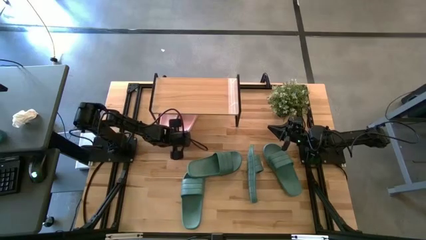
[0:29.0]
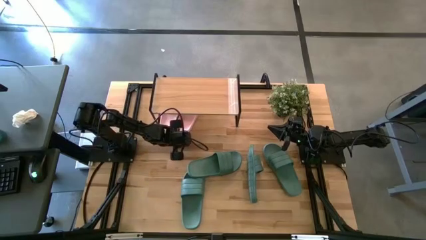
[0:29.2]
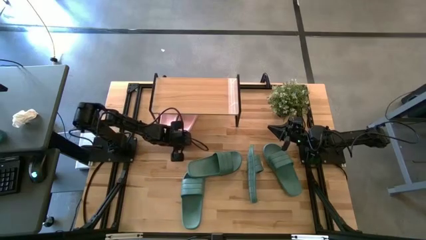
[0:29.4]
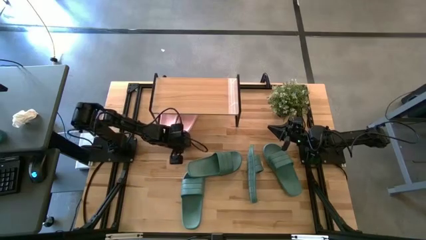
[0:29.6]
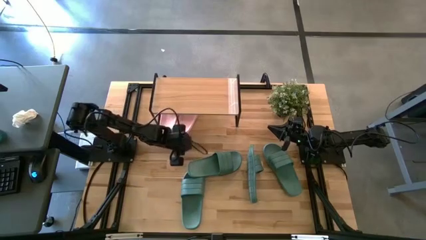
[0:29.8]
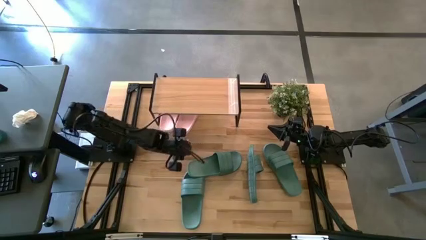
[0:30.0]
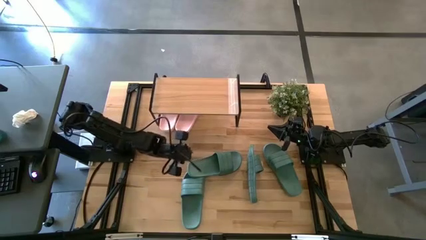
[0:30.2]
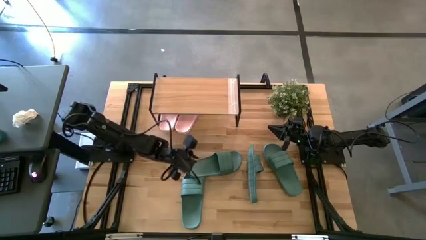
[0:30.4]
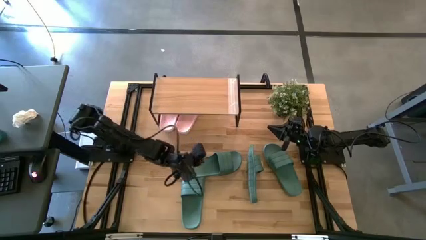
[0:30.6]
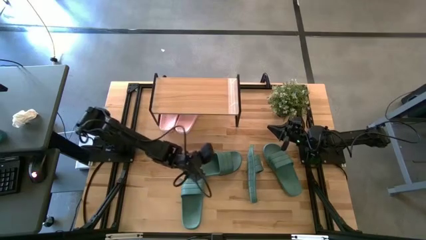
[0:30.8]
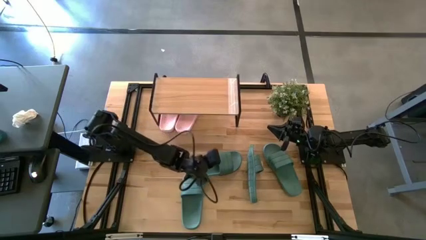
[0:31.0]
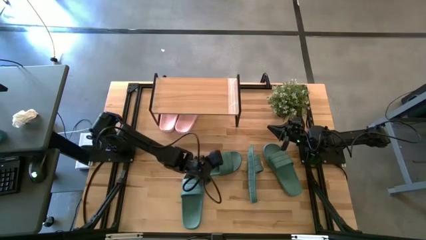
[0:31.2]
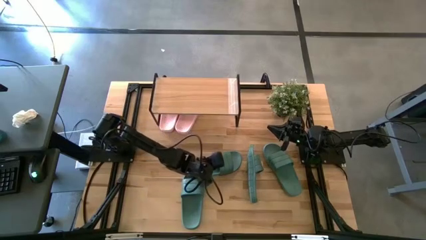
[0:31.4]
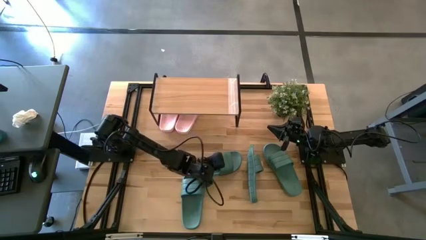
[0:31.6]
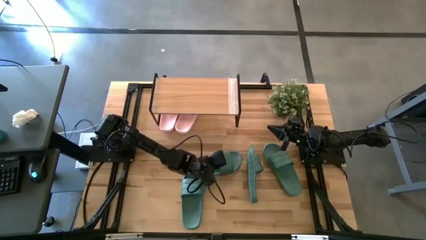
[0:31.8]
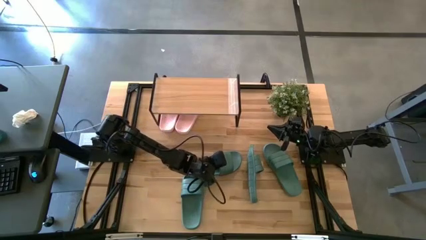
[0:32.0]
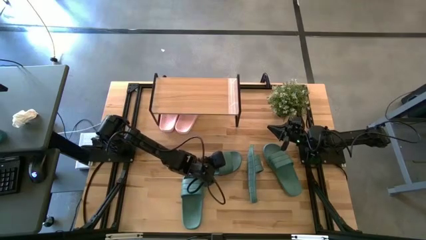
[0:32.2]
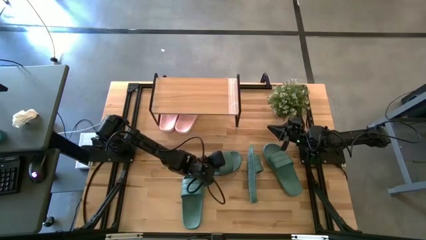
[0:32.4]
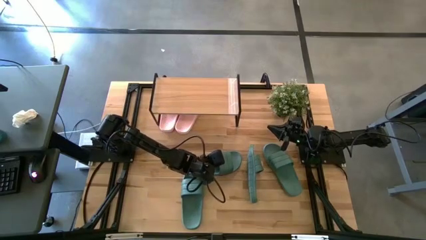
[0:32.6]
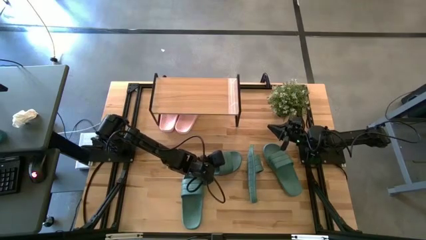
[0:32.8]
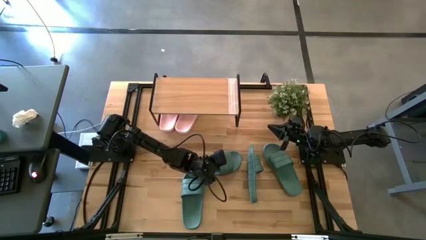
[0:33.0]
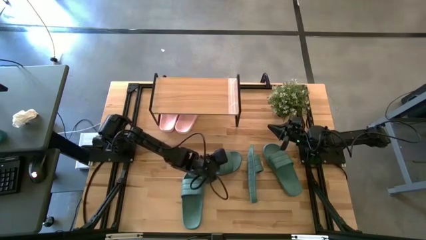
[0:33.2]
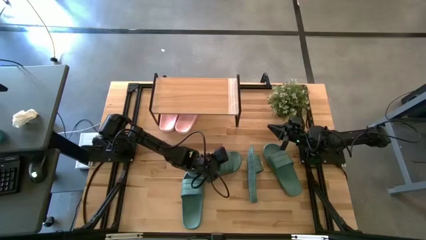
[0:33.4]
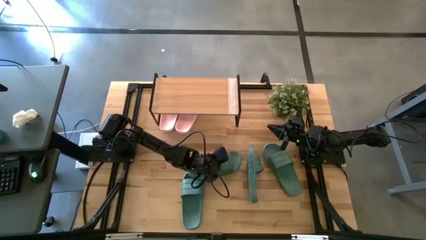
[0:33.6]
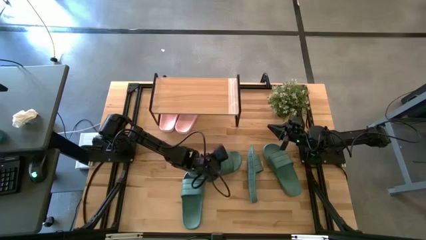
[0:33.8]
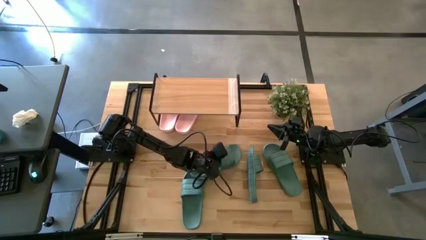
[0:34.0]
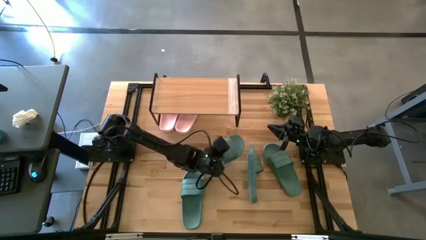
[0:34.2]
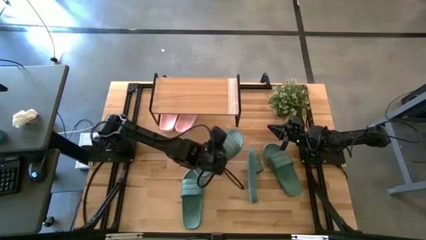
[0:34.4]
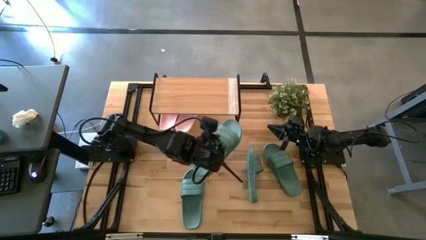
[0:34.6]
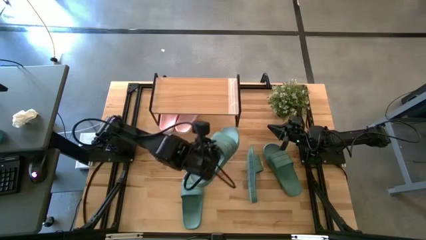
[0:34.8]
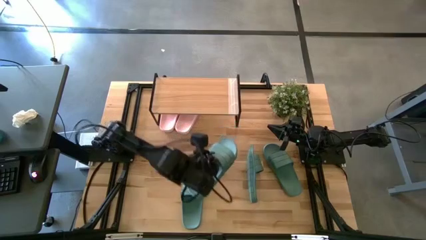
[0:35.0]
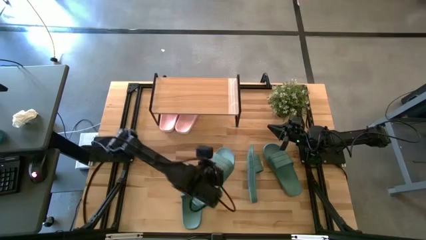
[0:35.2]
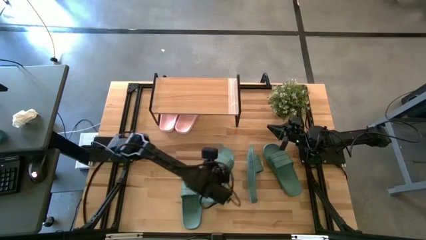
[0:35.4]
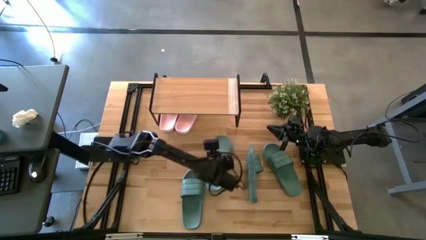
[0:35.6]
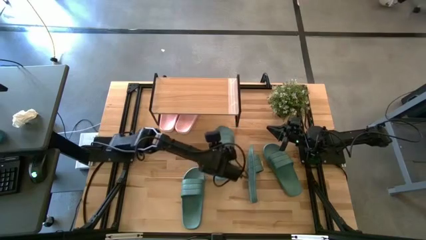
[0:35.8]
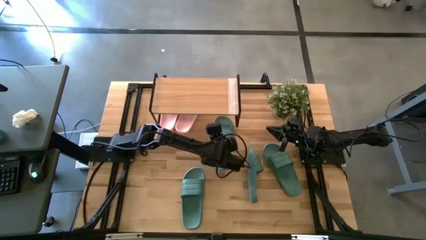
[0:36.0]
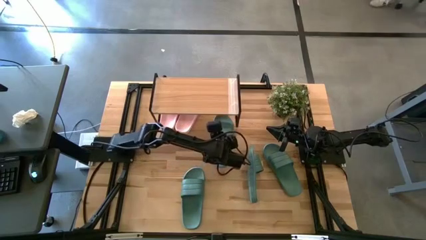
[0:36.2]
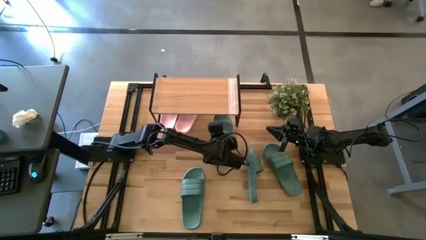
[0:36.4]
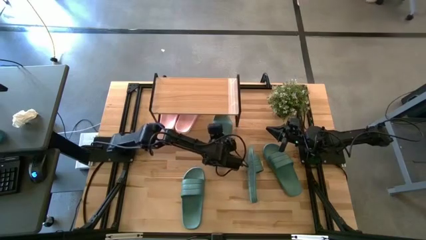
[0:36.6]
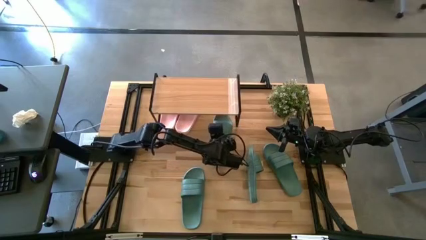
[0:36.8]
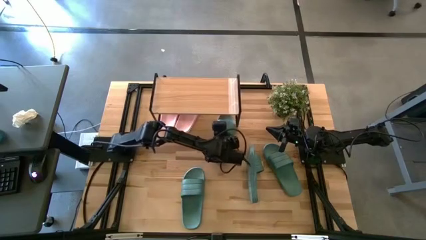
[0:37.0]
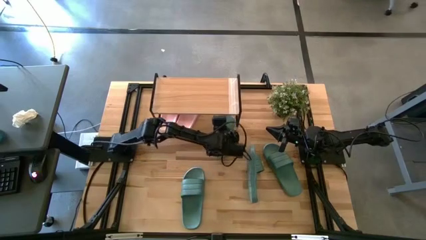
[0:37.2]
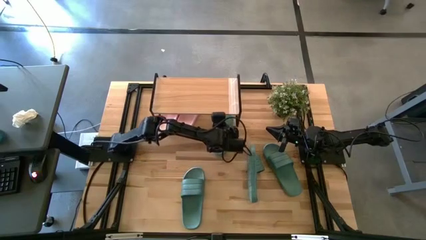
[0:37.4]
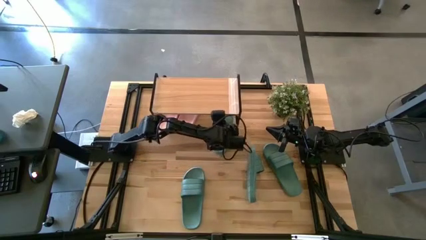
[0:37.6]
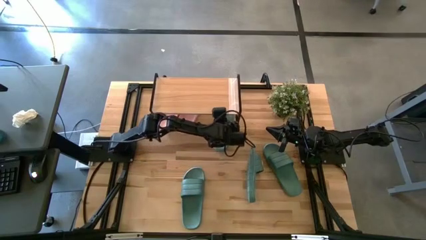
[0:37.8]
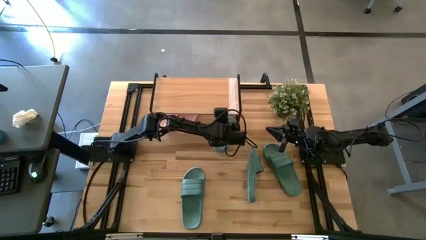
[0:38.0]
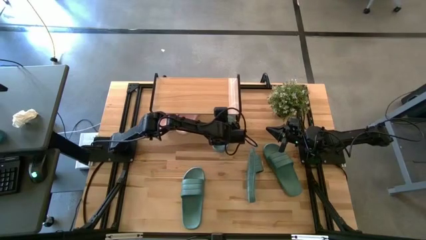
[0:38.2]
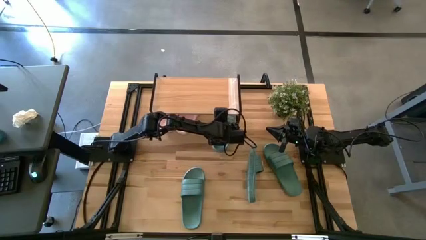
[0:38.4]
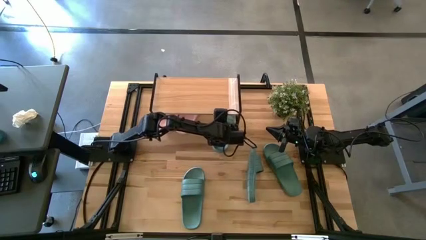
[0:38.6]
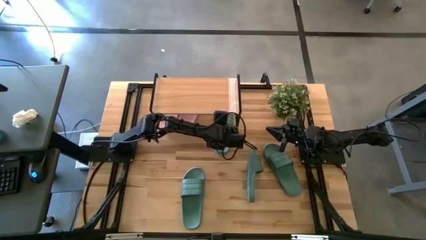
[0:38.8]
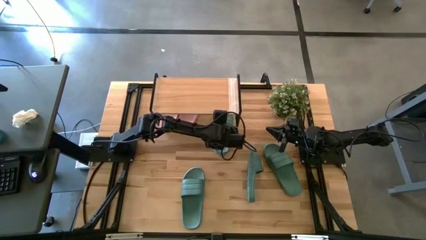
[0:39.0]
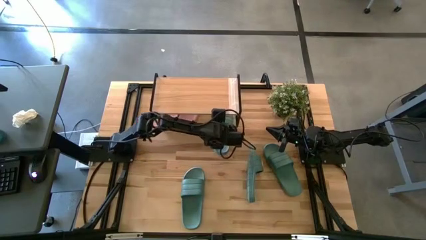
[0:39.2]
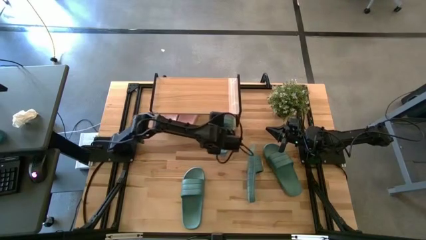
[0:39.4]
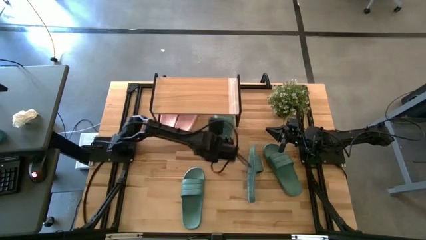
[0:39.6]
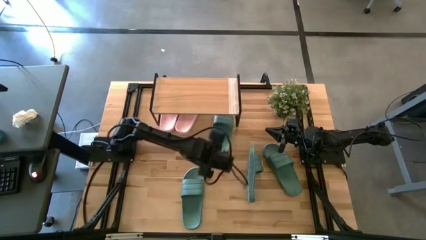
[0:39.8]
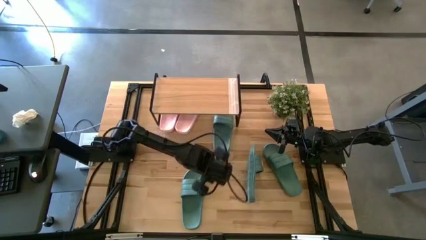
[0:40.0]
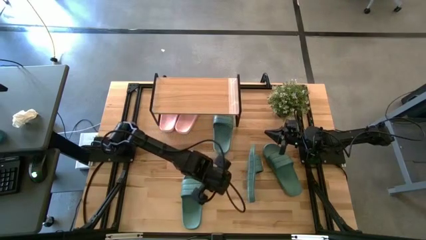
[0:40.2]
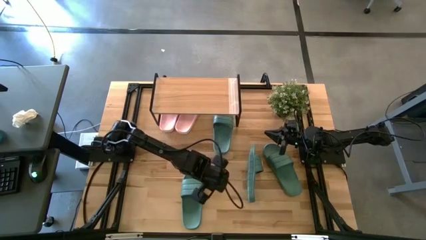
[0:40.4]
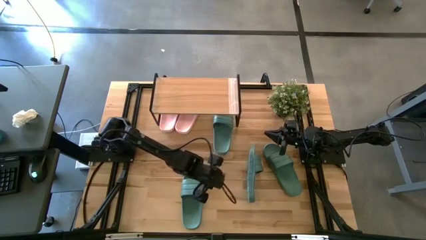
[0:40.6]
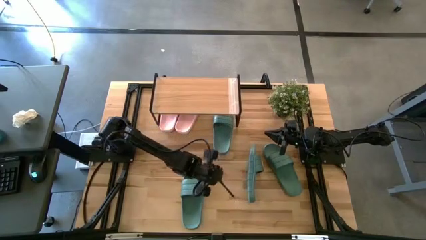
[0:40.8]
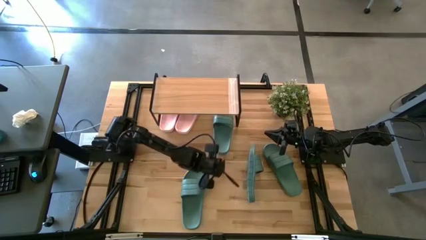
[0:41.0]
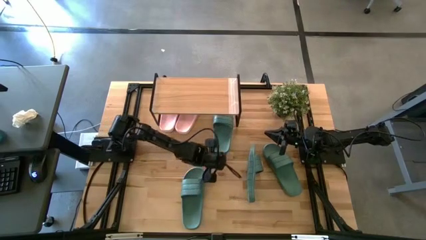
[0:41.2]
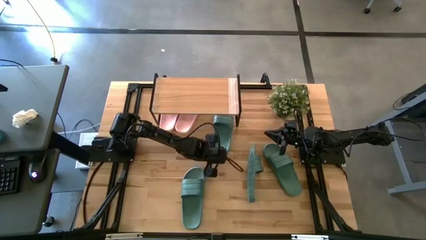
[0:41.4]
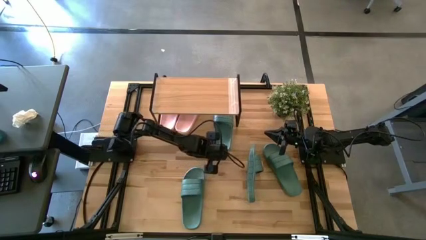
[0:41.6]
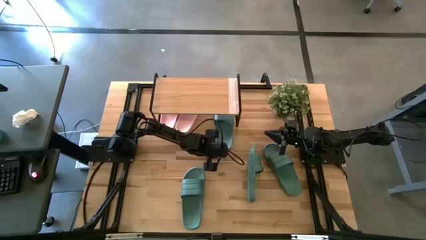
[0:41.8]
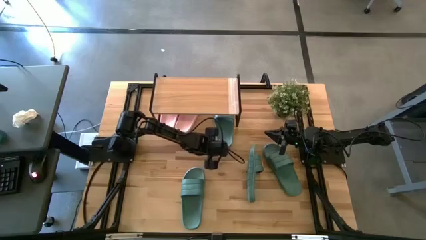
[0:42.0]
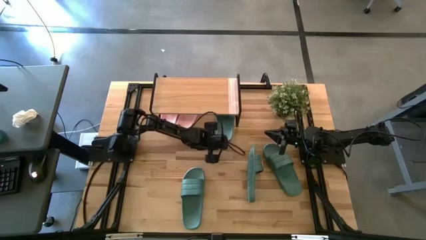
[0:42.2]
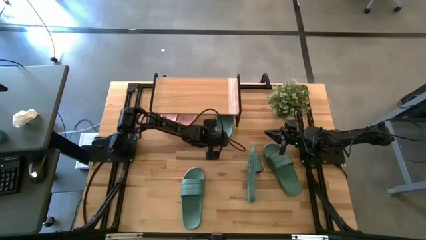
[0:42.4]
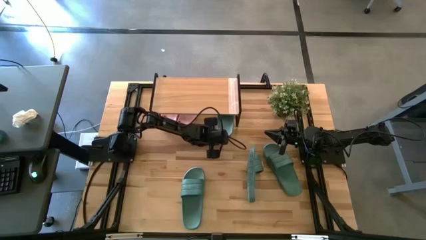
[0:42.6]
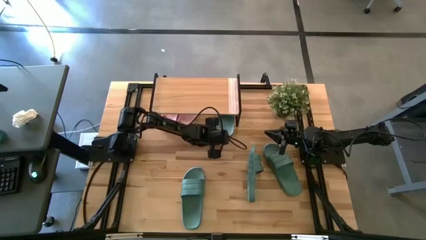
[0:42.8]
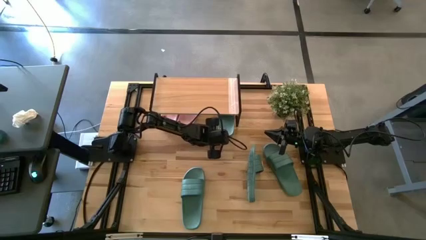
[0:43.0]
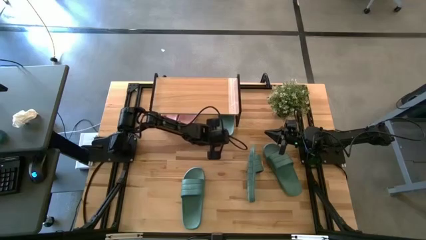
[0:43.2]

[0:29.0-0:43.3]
Task: Pick and place slides into the shelf
Put the right green slipper on the bottom shelf
